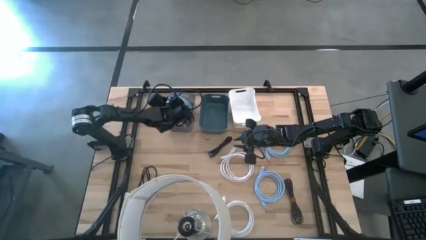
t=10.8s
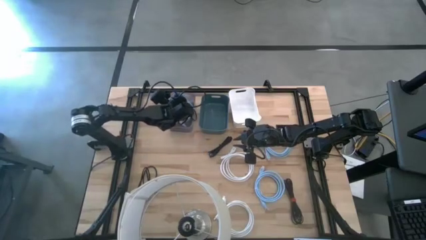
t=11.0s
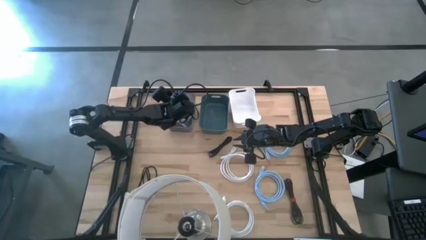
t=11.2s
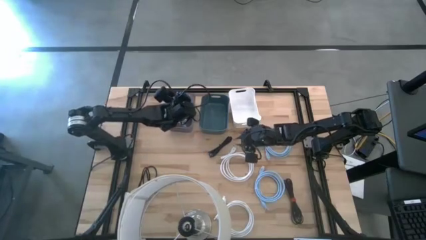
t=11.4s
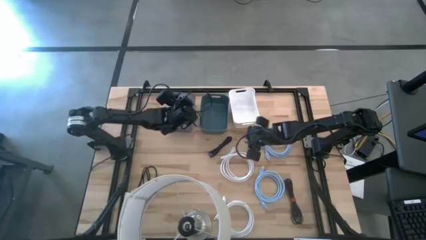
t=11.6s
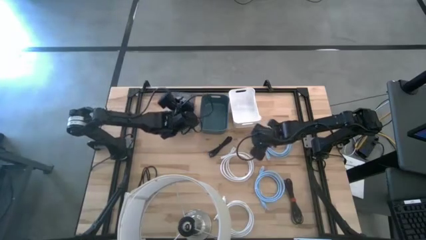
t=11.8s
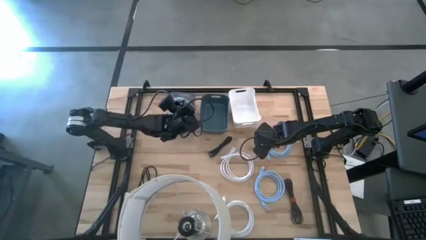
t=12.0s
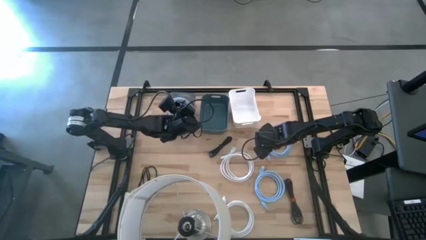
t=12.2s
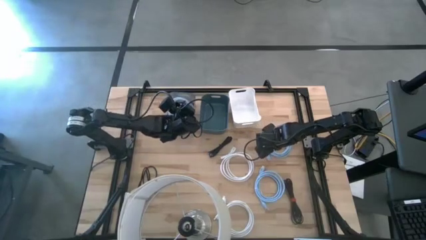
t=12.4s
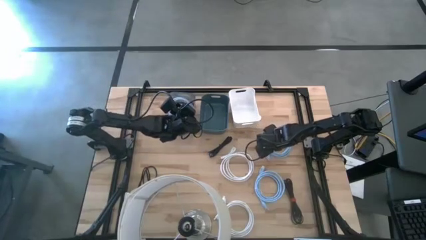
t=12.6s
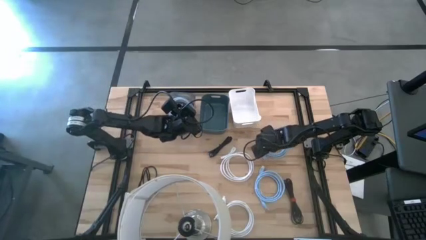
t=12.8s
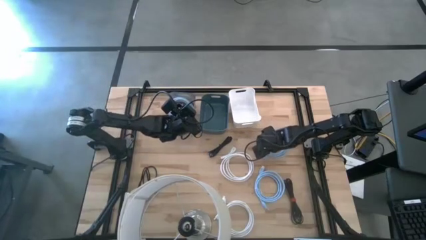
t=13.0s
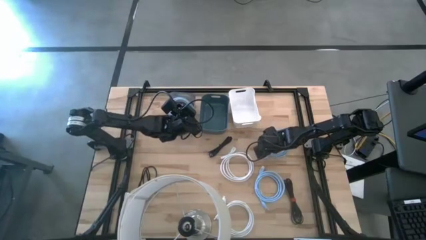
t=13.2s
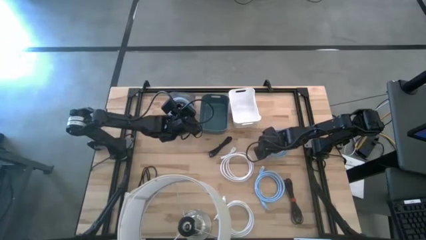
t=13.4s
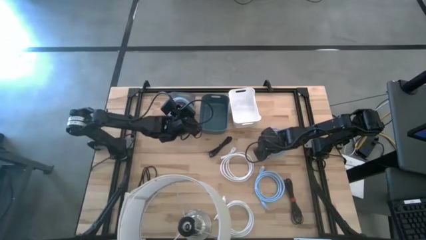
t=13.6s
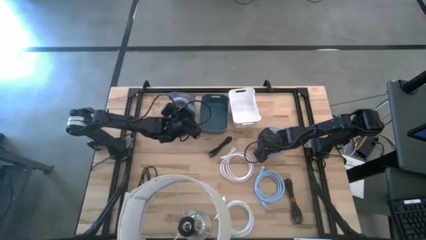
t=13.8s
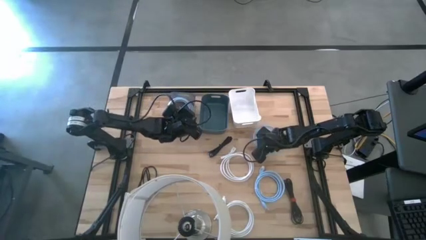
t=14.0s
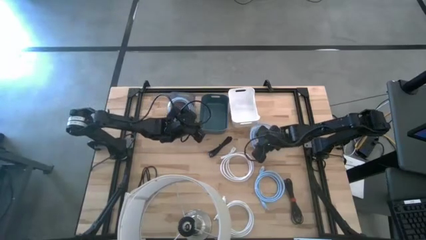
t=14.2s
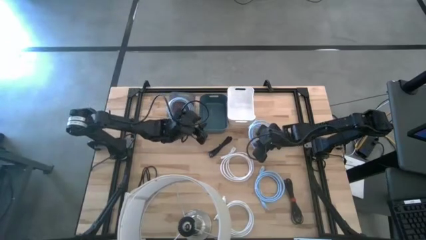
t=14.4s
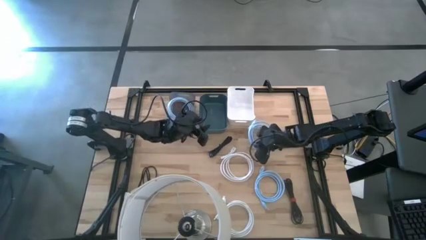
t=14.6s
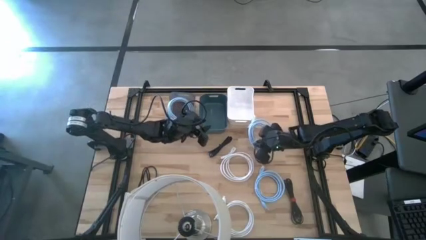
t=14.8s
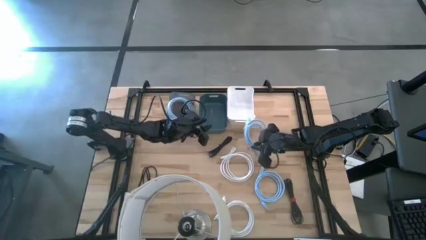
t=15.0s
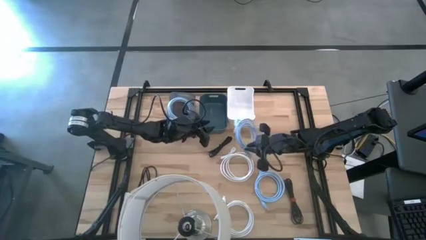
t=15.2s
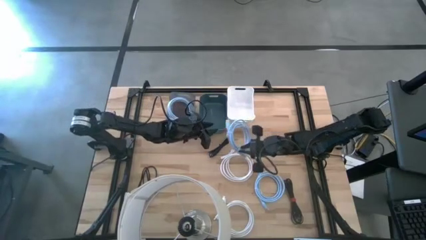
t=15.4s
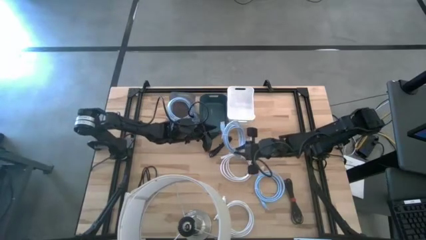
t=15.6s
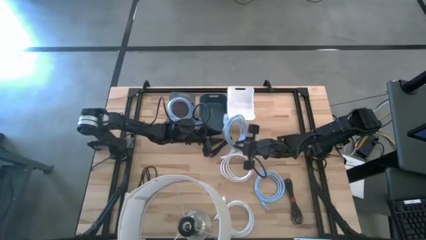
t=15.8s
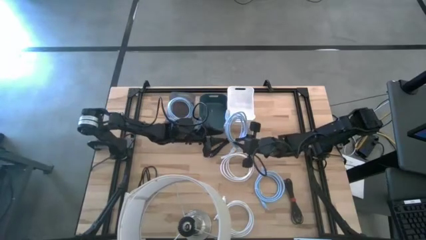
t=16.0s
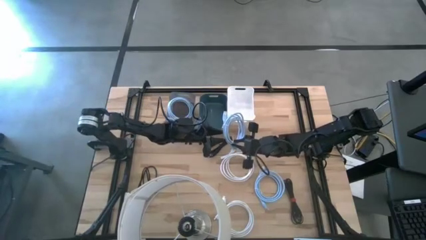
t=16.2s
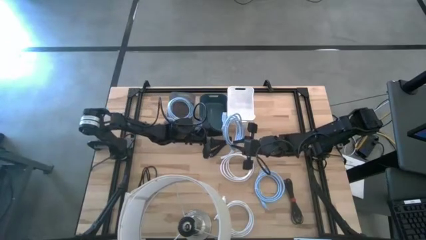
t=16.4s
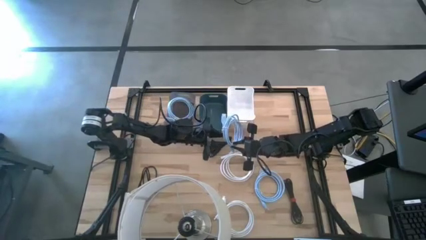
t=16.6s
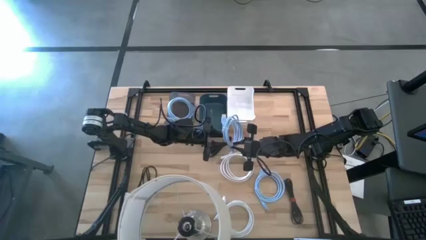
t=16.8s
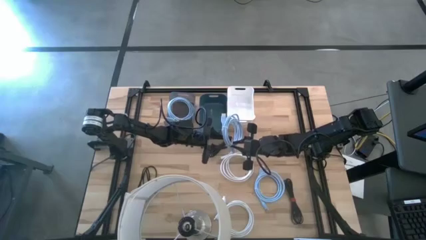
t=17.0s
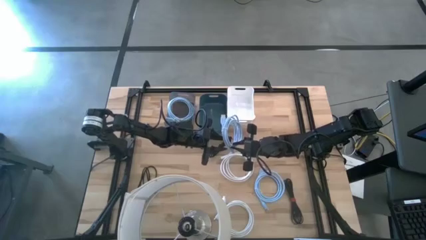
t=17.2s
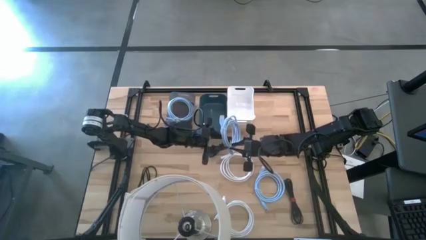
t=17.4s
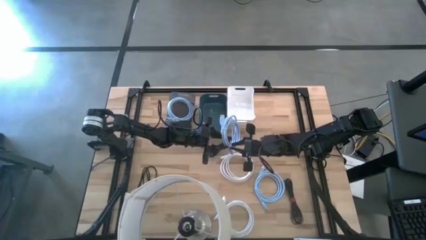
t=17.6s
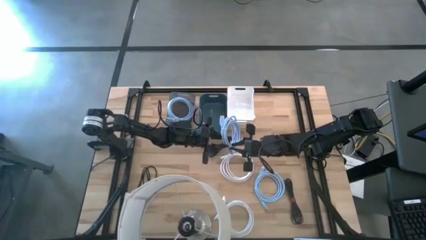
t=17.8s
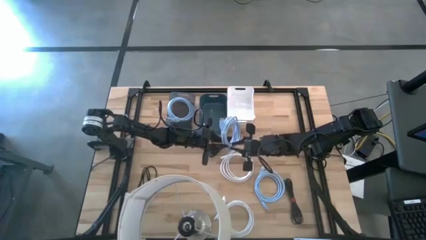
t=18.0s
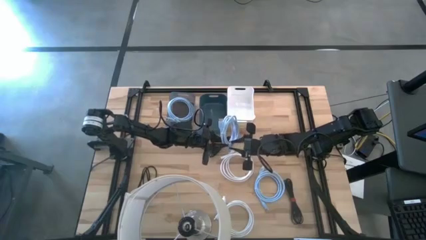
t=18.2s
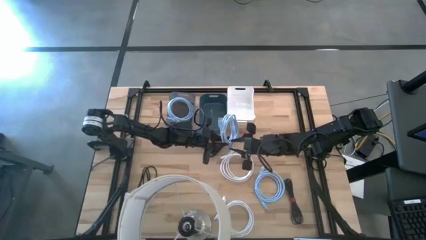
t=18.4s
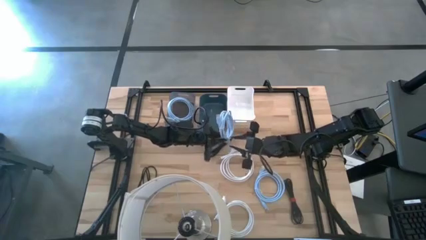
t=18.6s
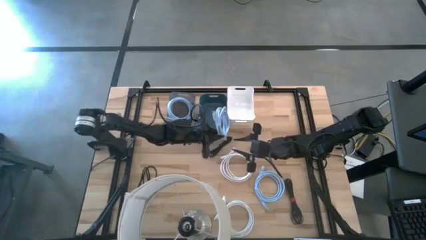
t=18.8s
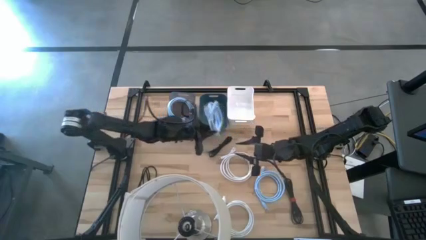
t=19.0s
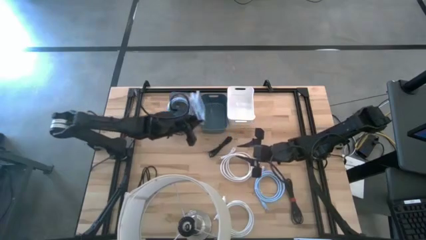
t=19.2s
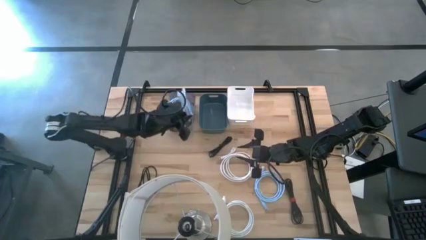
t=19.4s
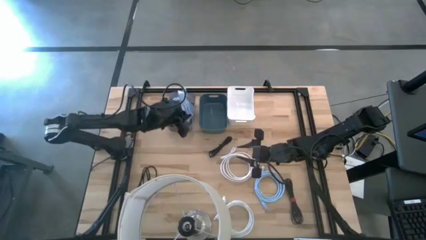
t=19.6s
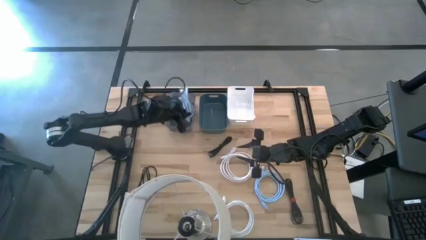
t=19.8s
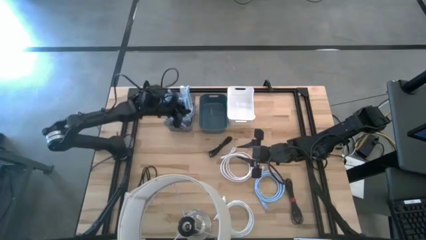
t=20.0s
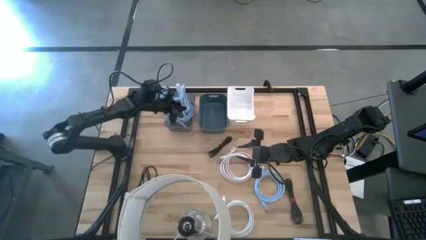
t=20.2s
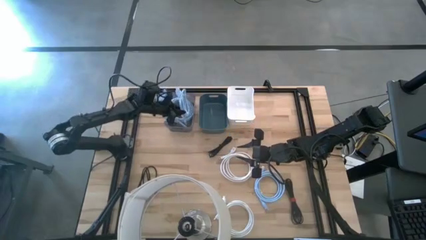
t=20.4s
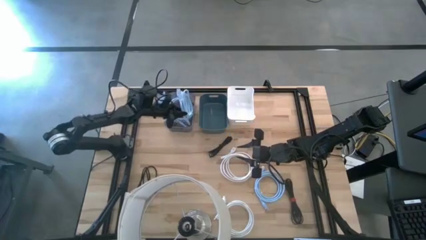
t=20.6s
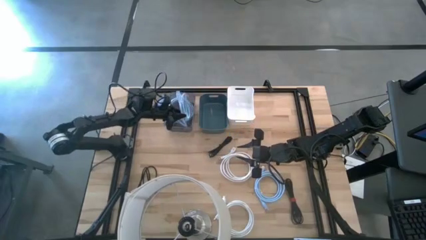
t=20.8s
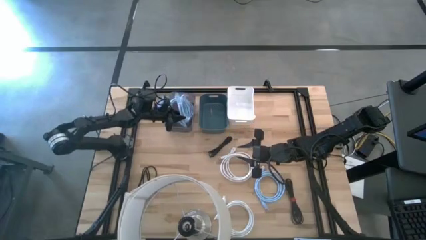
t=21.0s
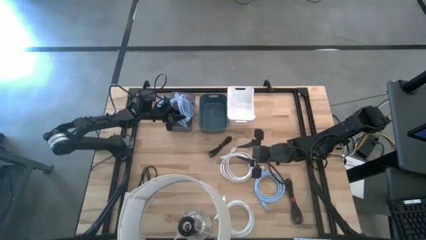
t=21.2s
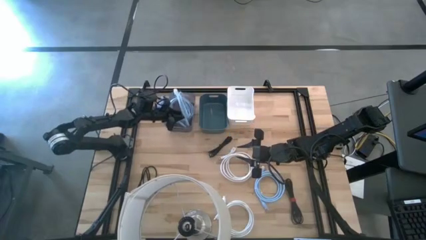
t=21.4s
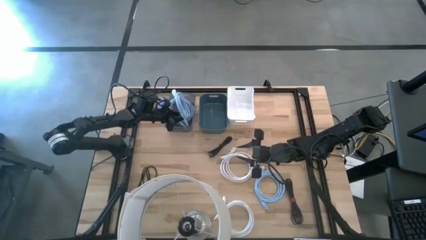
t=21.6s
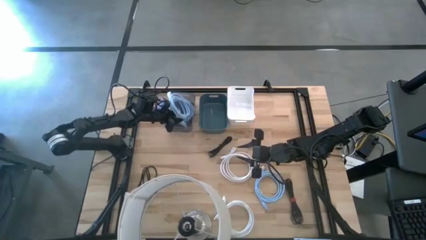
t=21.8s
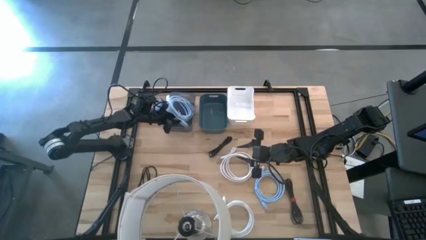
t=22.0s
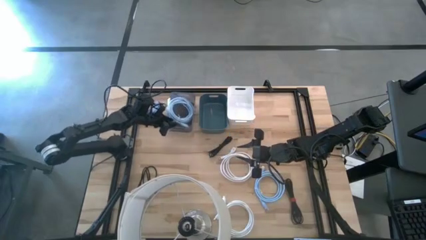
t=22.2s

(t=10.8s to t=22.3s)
Task: Sort HDMI cables
Put the top blue HDMI cable into the black bin
